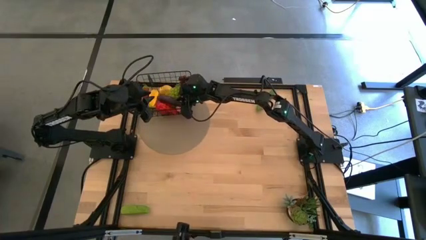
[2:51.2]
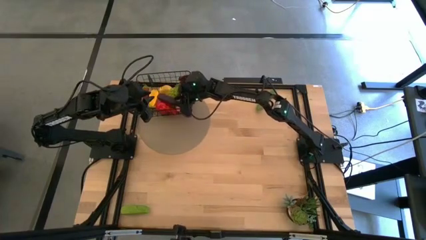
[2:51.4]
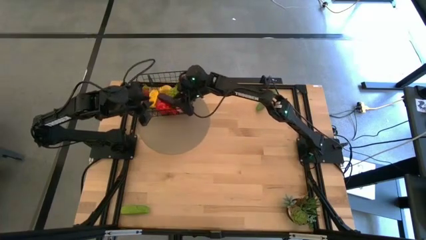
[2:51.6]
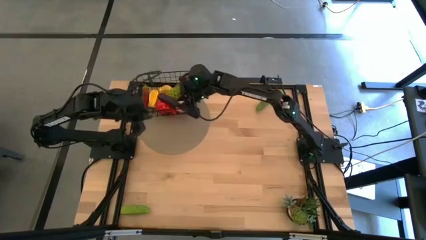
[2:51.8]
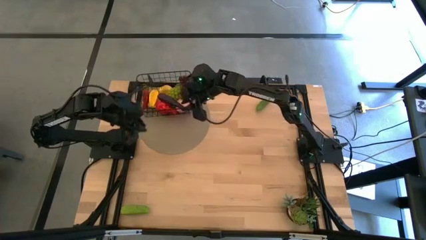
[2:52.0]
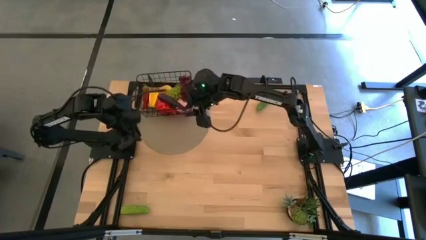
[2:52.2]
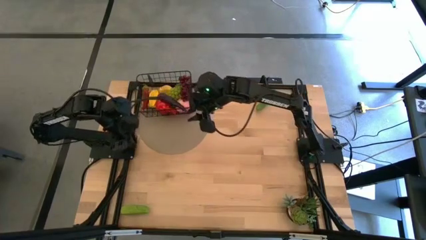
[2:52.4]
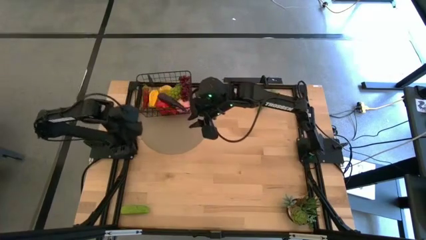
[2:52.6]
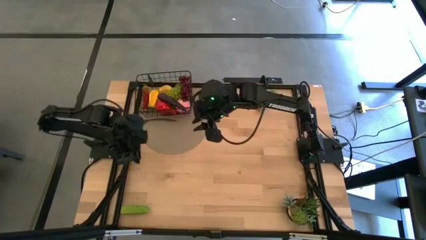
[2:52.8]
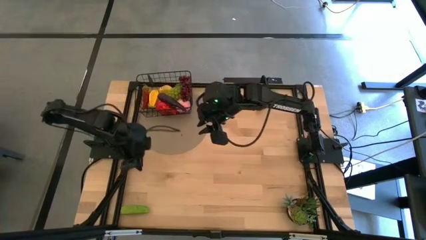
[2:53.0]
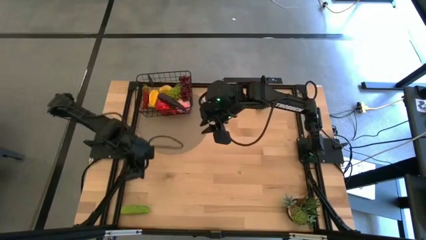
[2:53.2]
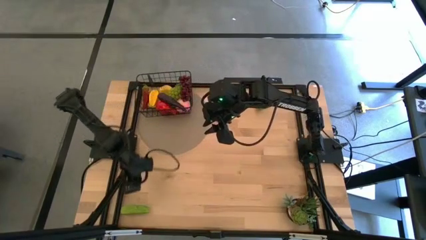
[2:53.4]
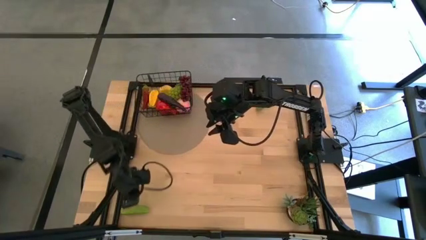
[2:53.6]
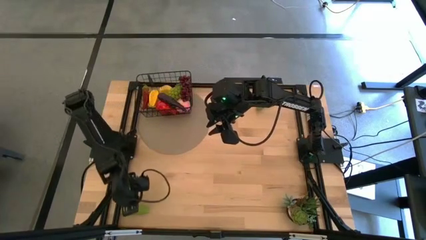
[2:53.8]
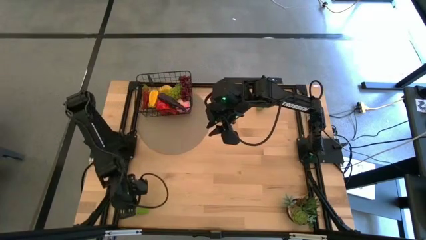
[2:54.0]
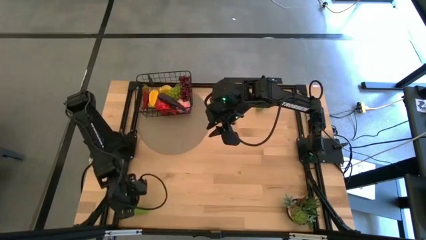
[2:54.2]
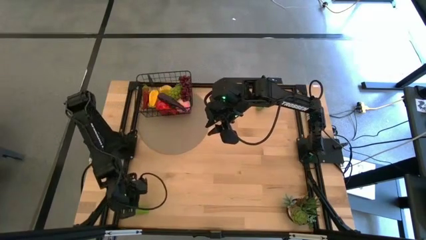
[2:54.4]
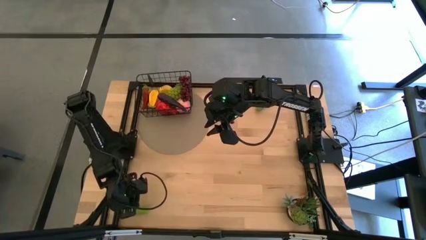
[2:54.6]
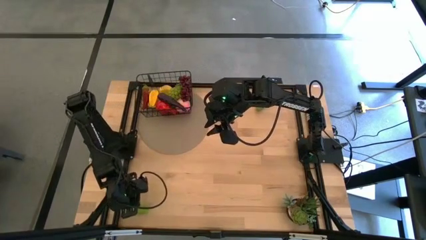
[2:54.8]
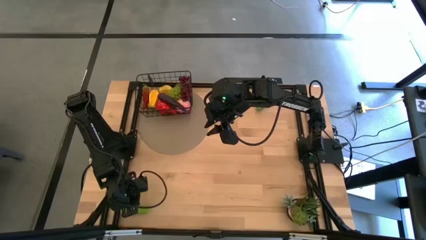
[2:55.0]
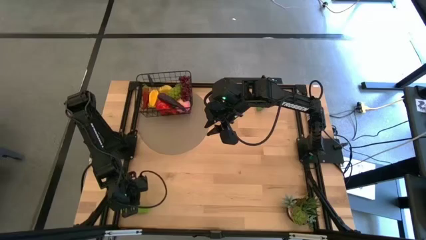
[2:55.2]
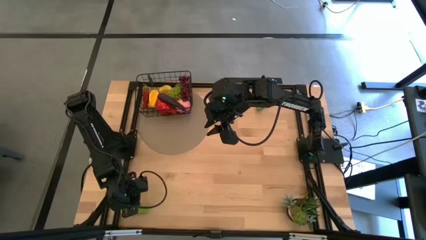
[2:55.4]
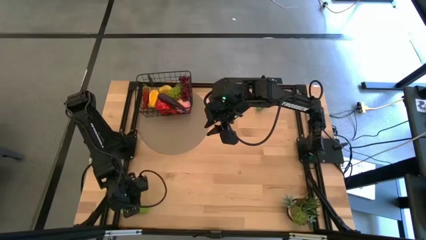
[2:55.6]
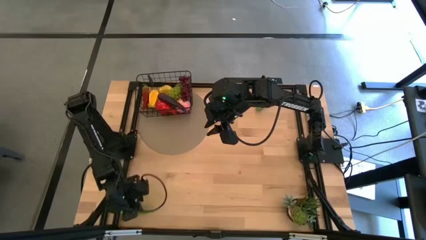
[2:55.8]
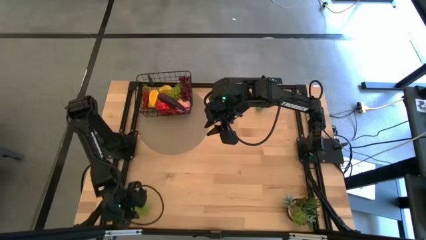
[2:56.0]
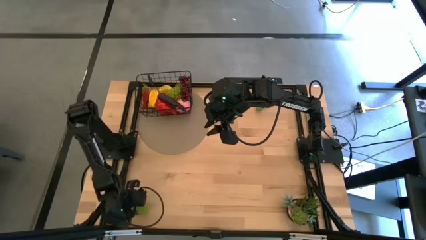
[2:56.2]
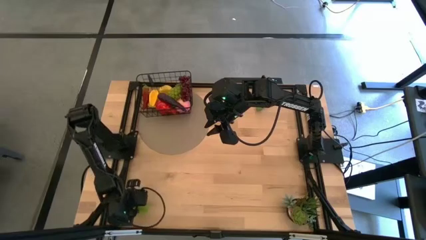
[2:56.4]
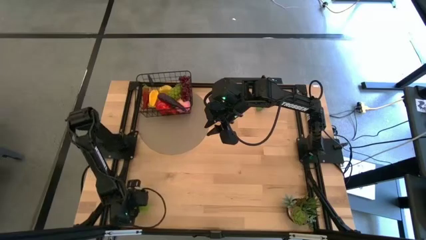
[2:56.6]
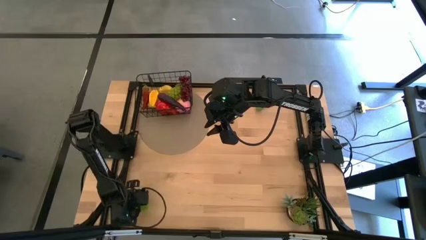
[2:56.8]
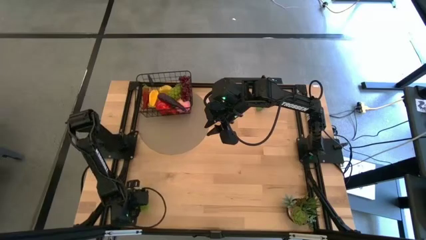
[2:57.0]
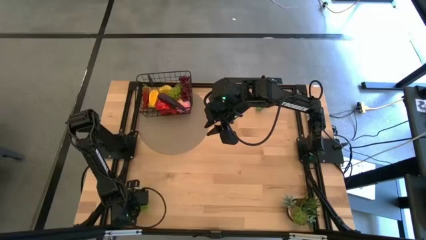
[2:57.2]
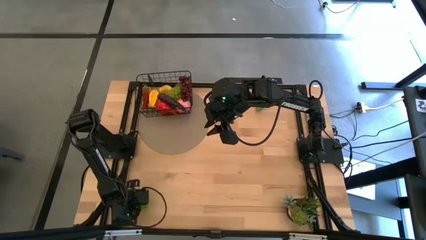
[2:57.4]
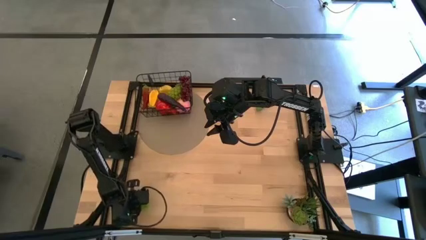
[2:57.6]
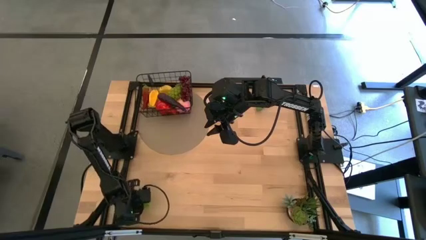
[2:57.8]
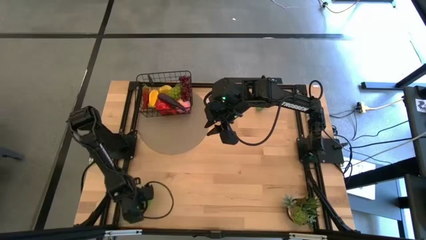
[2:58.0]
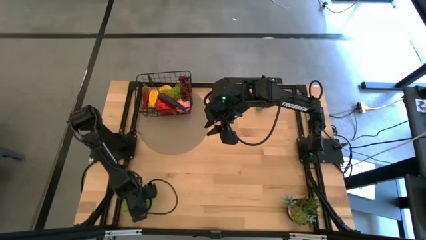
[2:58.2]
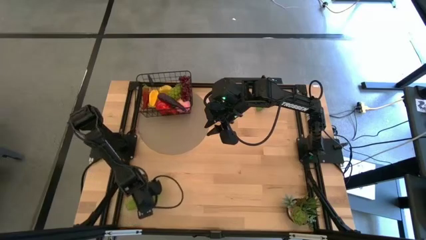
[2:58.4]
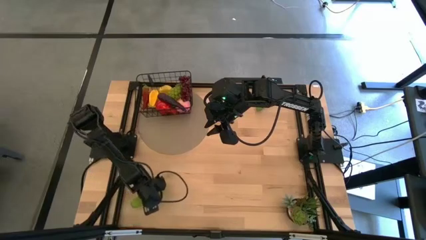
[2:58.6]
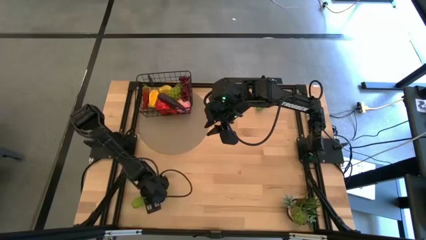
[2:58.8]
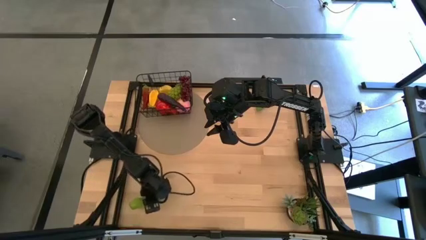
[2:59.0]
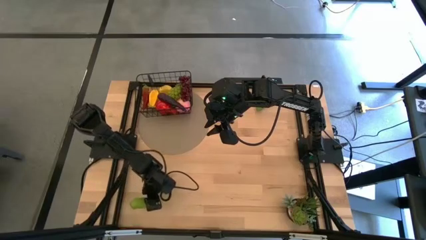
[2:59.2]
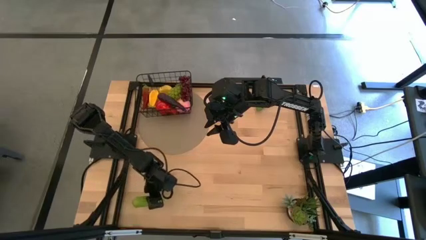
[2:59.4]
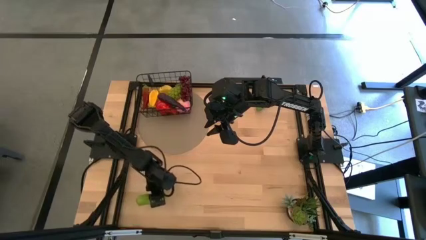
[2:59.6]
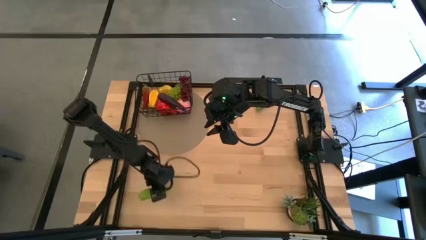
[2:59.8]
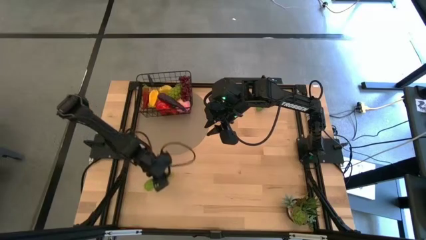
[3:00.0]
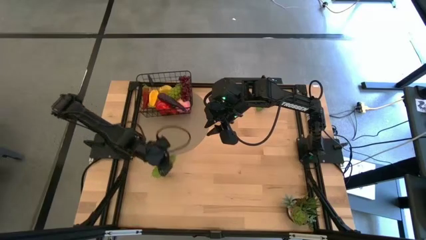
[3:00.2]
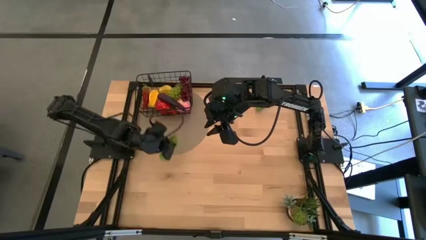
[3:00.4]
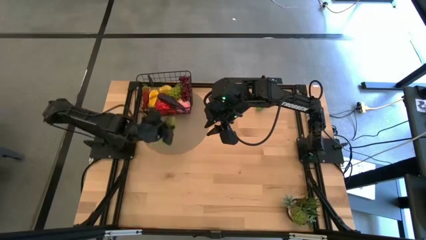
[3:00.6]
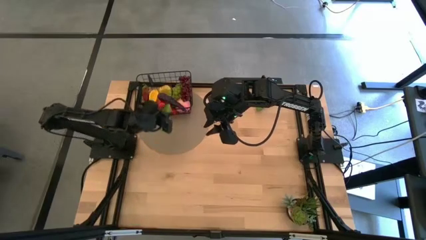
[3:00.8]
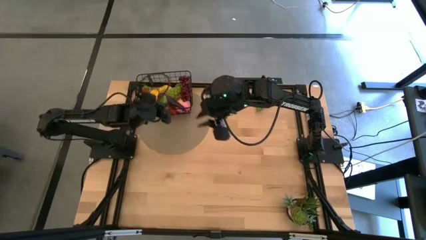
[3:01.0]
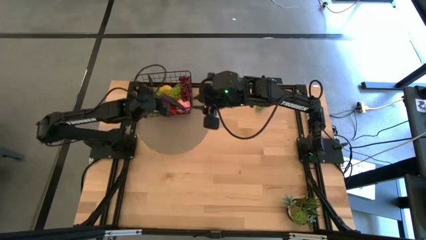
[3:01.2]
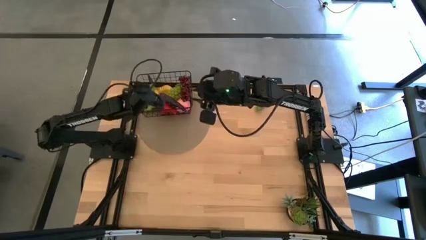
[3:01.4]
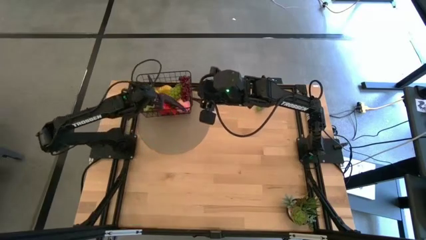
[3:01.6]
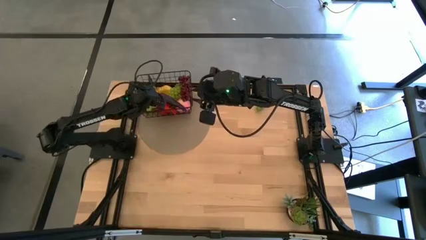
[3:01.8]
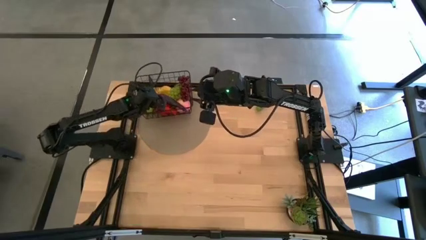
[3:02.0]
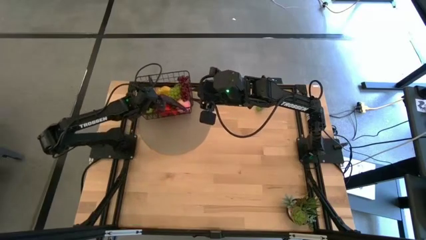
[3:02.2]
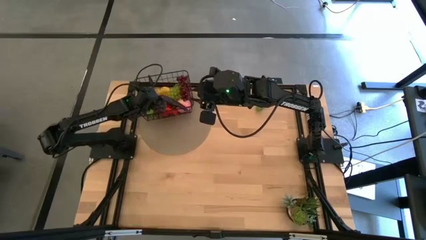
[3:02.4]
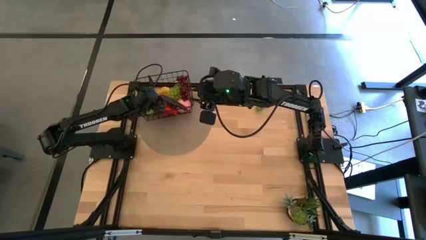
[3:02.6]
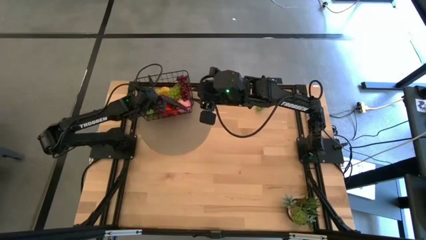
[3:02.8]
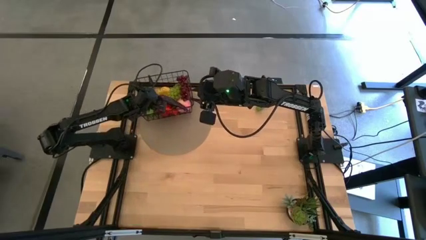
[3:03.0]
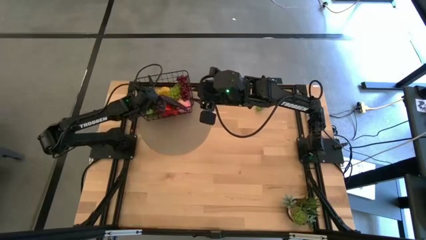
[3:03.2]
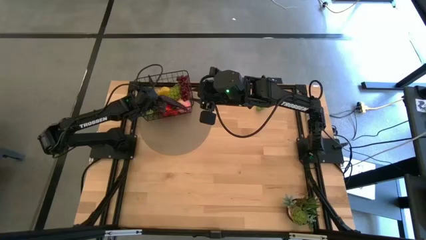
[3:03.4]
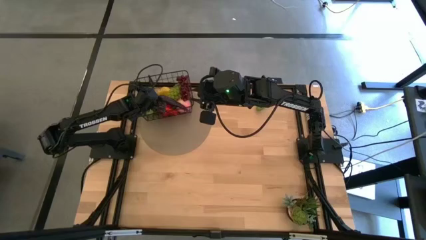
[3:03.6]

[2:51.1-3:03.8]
Task: Build produce basket
Put the bottom green cucumber into the black wire basket

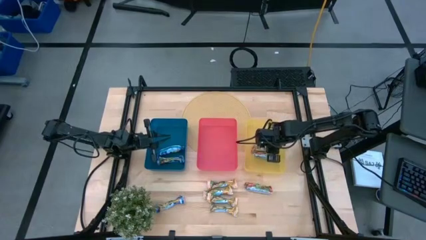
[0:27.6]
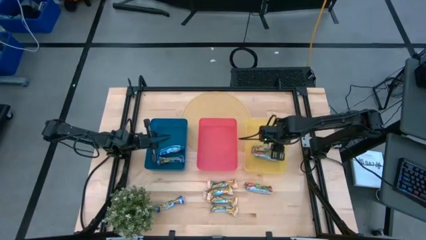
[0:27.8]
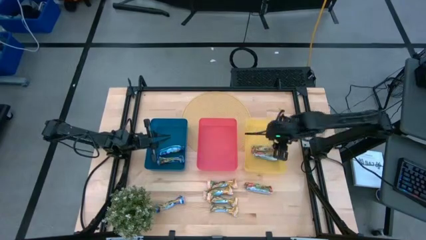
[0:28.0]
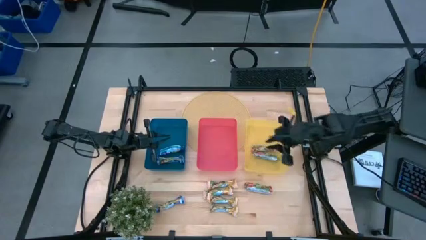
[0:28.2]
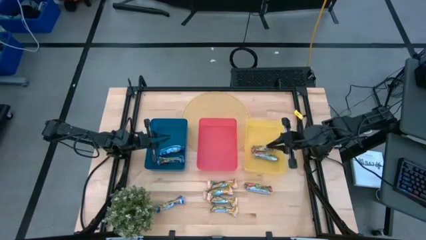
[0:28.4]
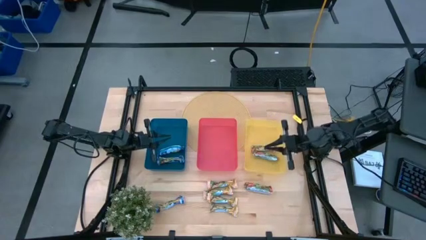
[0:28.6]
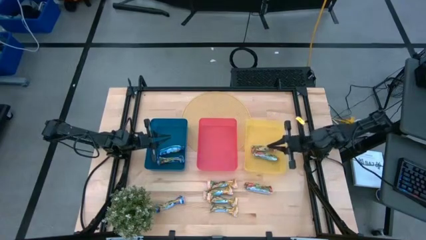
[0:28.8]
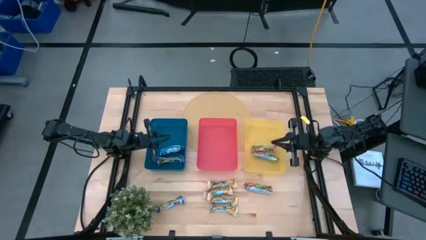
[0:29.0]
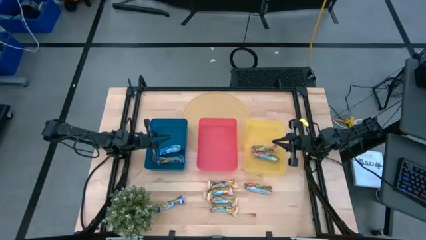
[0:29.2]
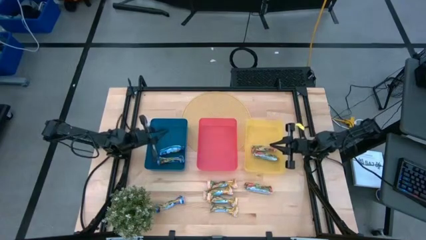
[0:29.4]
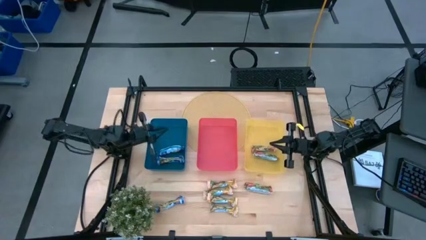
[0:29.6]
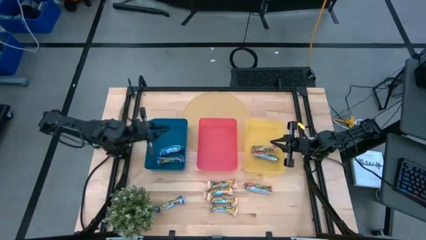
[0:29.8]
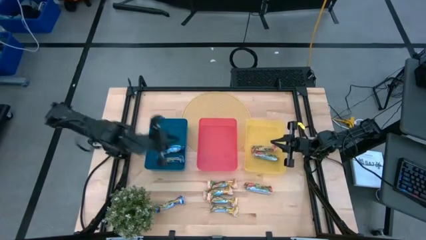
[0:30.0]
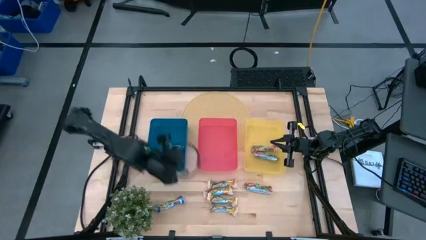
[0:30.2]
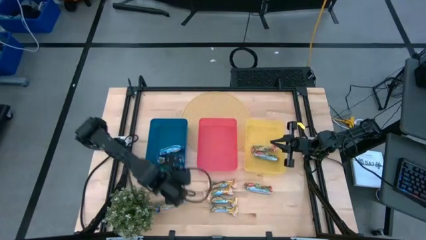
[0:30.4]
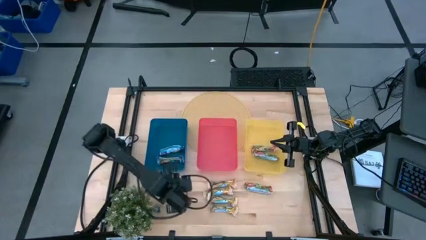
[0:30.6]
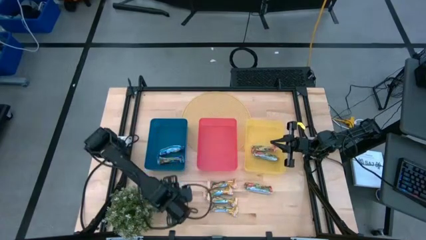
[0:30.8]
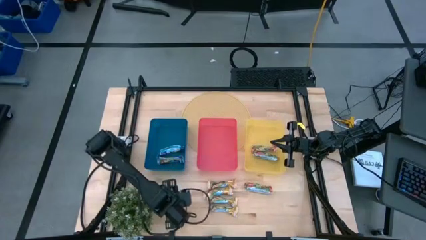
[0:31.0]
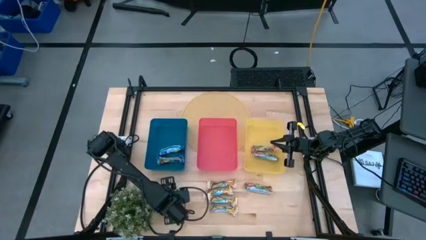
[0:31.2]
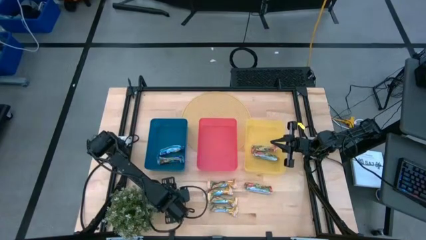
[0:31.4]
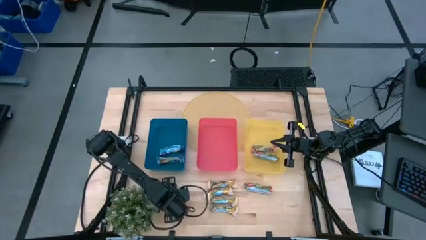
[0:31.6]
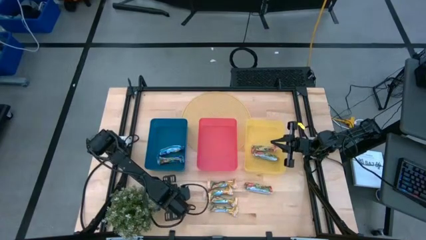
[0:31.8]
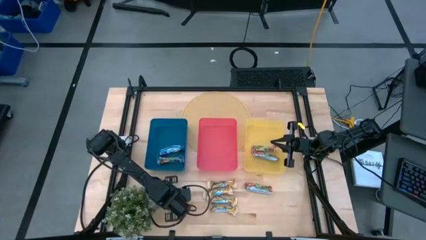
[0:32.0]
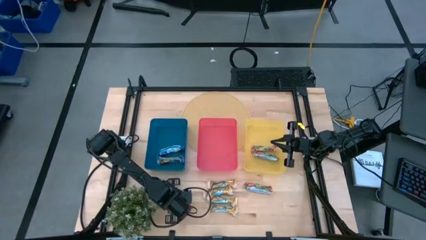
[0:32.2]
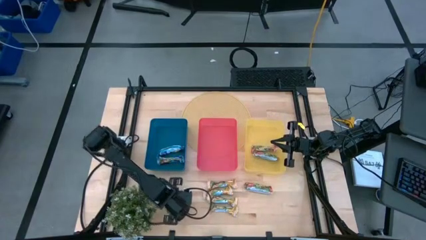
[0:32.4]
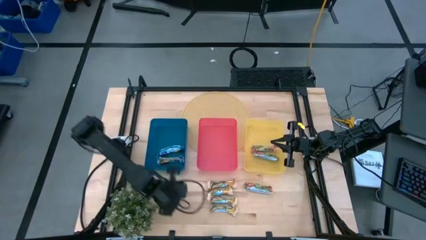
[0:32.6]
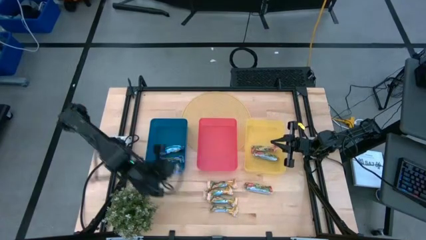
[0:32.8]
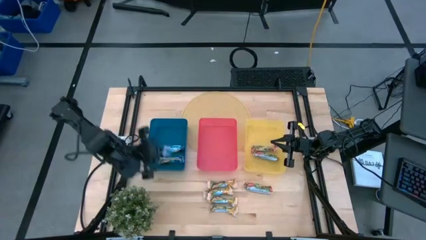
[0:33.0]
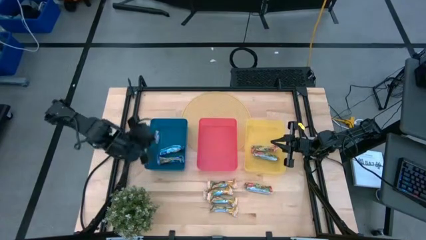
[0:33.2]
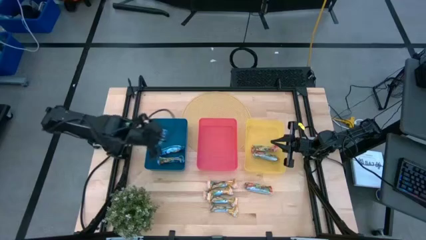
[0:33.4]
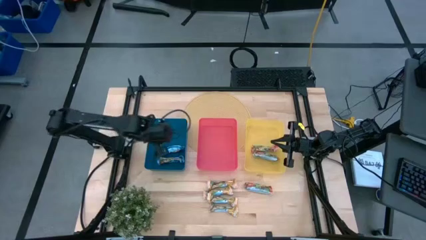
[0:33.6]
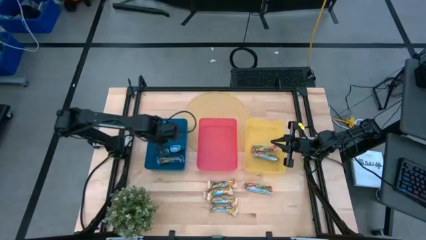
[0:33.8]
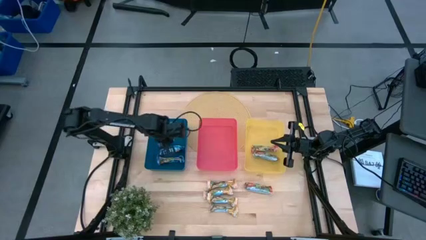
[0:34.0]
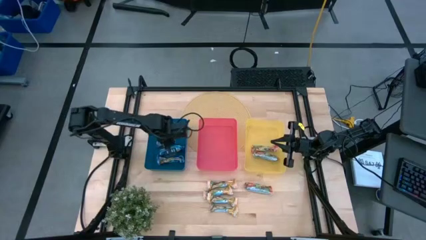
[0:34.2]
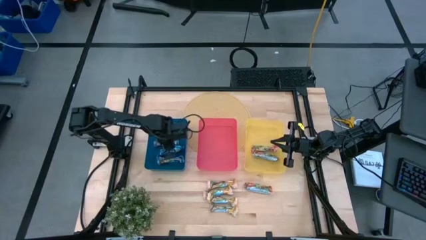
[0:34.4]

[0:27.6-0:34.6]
Task: Pick and place Granola Bars by type
Put the blue granola bar into the blue bin
